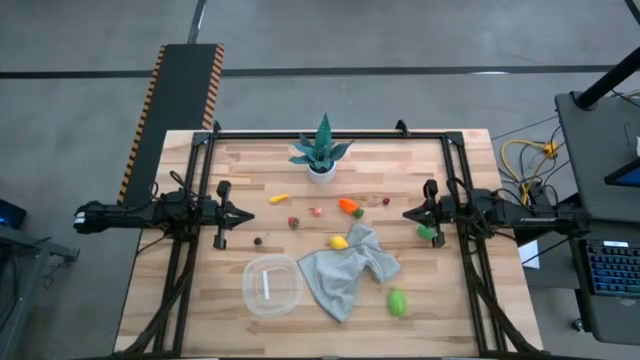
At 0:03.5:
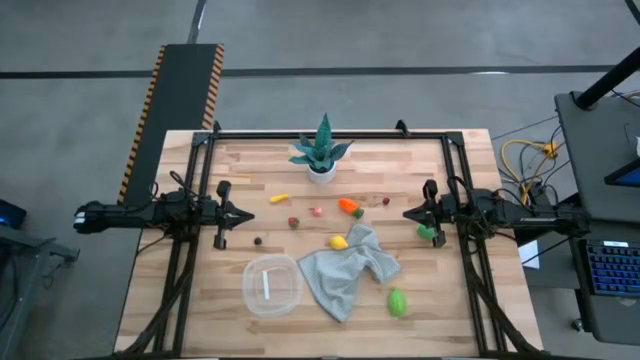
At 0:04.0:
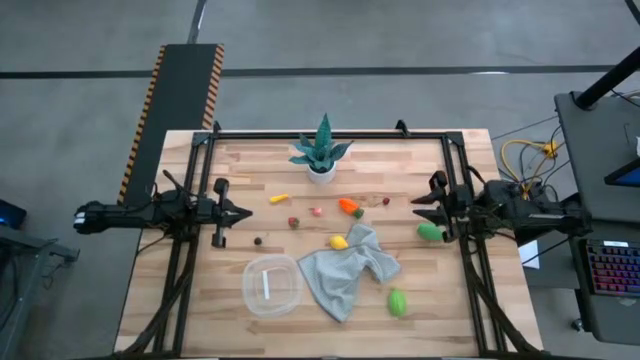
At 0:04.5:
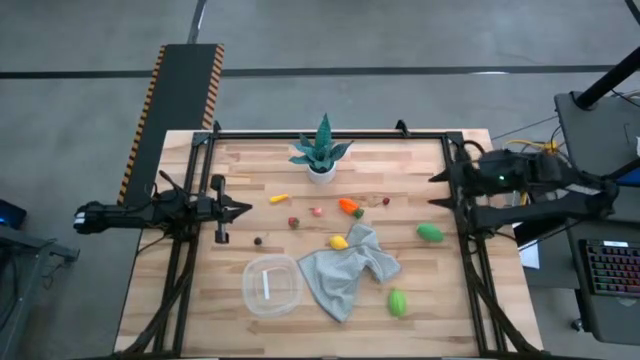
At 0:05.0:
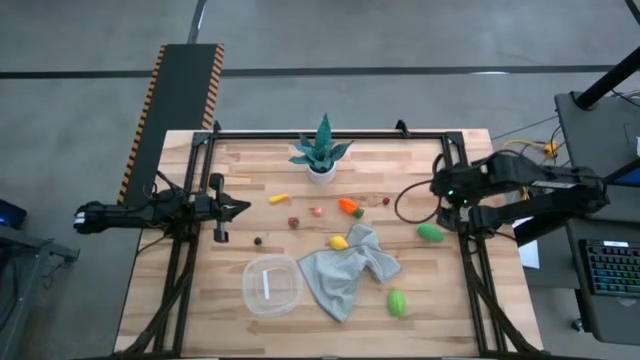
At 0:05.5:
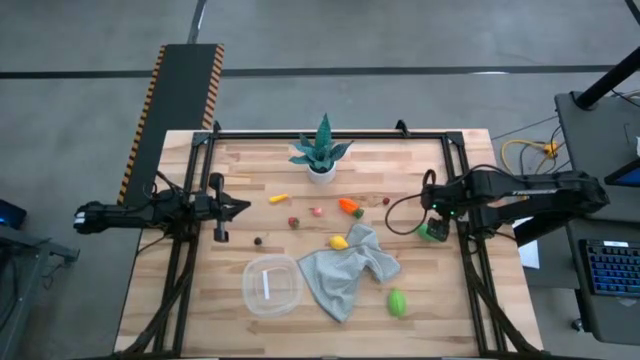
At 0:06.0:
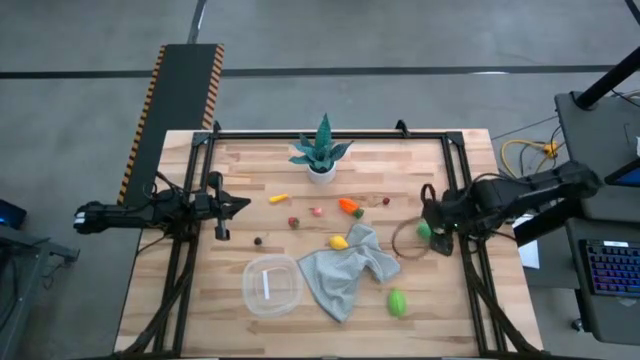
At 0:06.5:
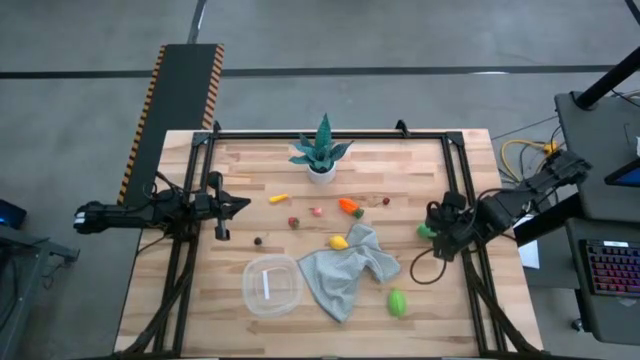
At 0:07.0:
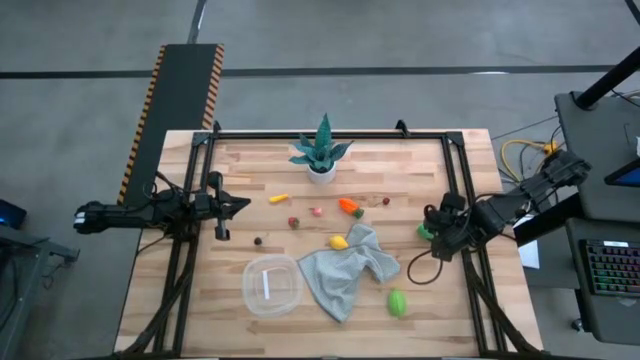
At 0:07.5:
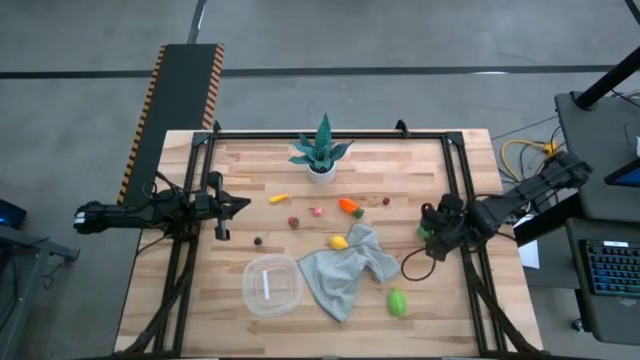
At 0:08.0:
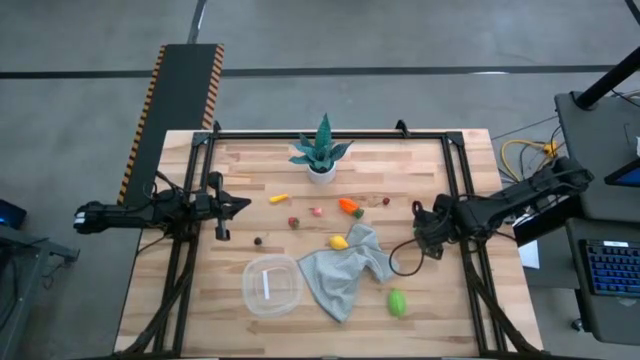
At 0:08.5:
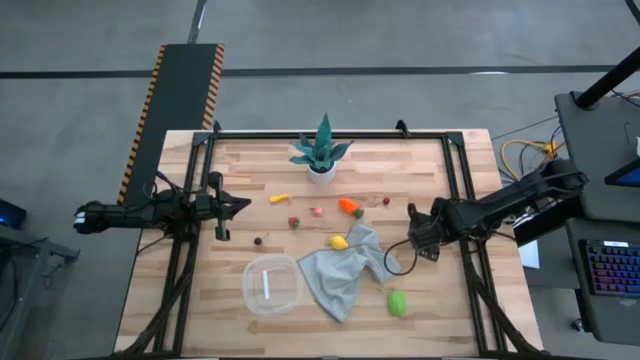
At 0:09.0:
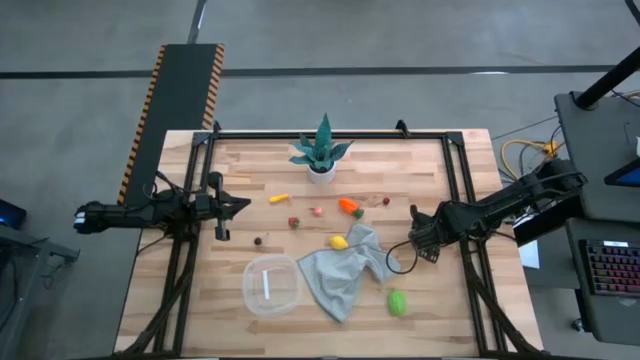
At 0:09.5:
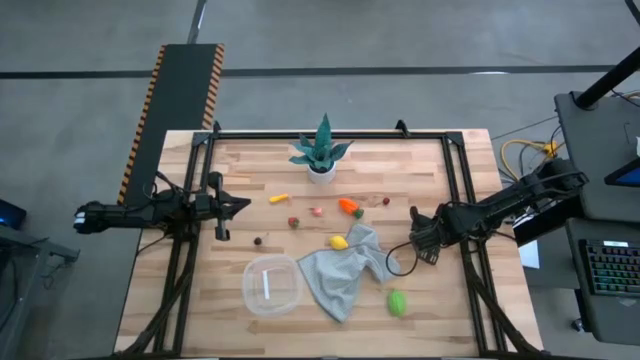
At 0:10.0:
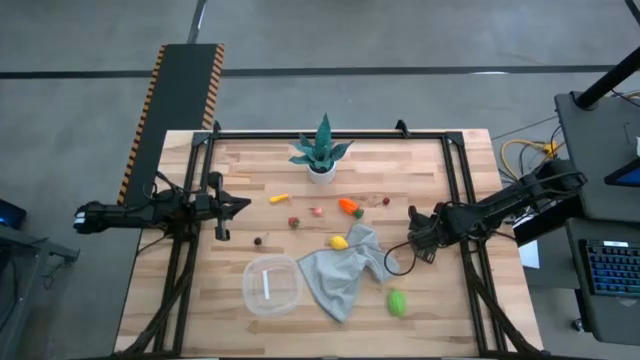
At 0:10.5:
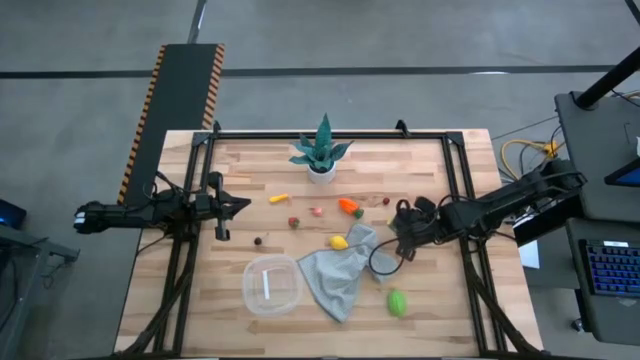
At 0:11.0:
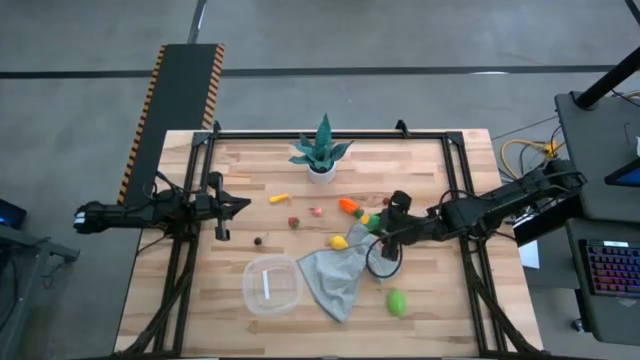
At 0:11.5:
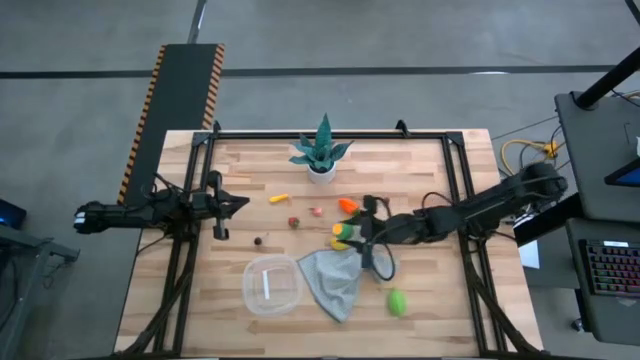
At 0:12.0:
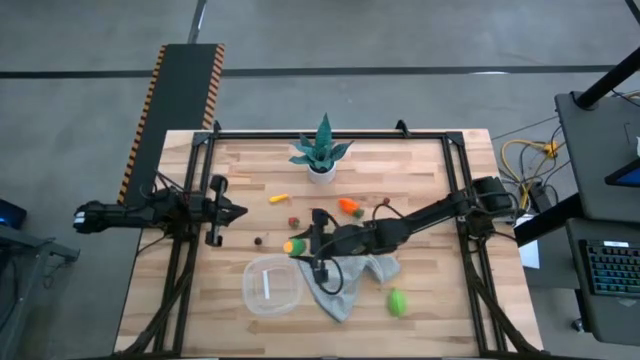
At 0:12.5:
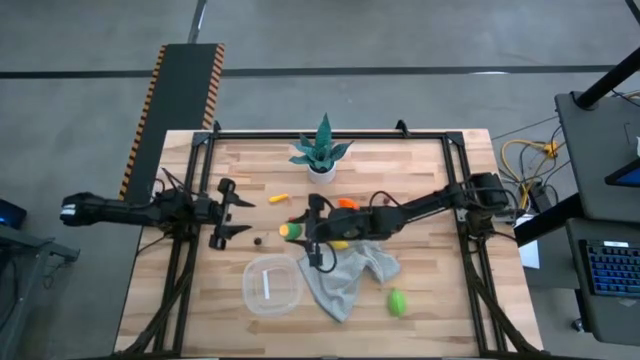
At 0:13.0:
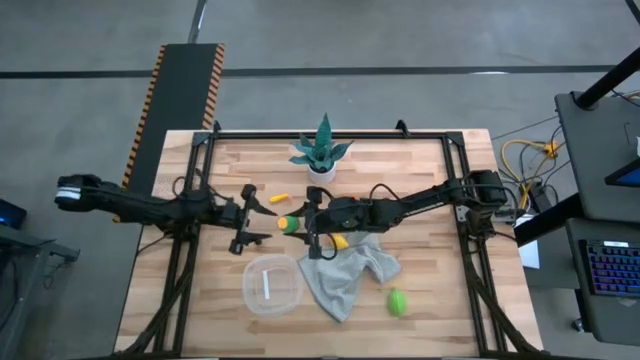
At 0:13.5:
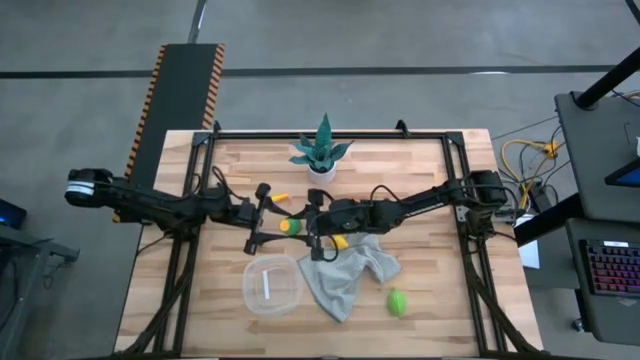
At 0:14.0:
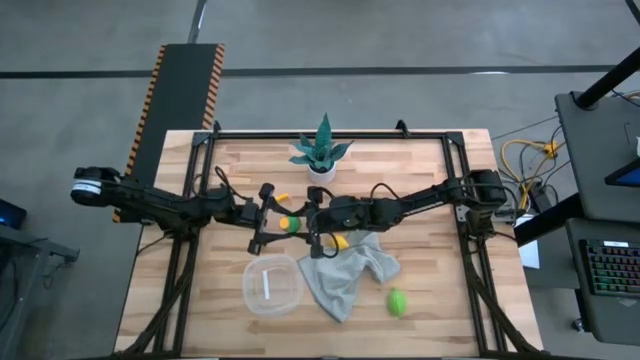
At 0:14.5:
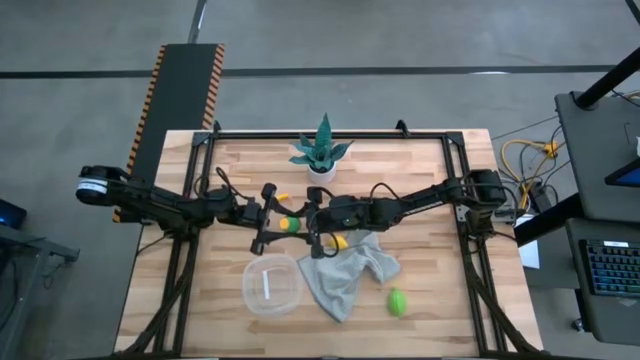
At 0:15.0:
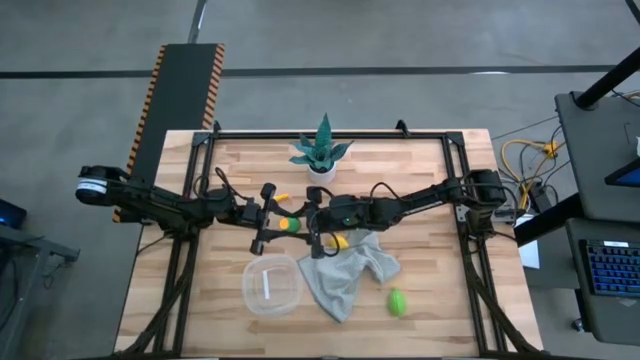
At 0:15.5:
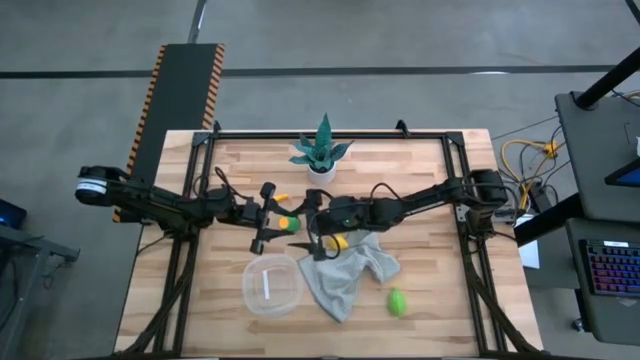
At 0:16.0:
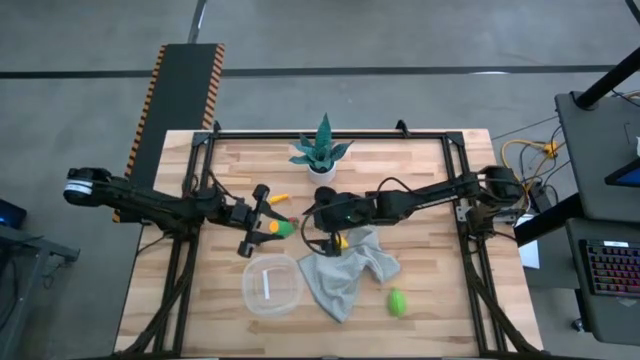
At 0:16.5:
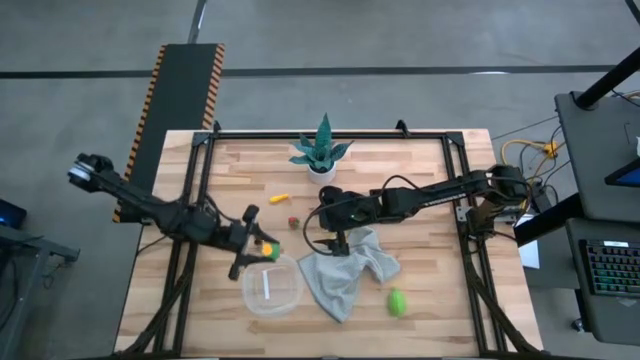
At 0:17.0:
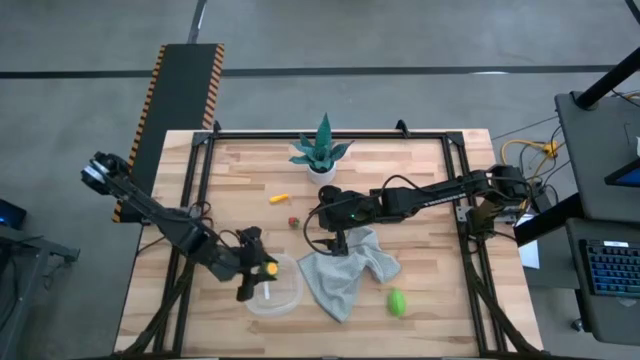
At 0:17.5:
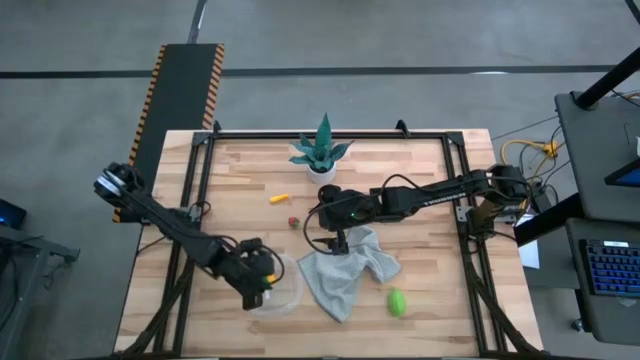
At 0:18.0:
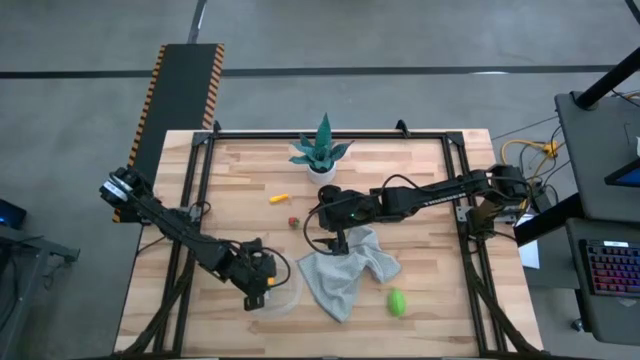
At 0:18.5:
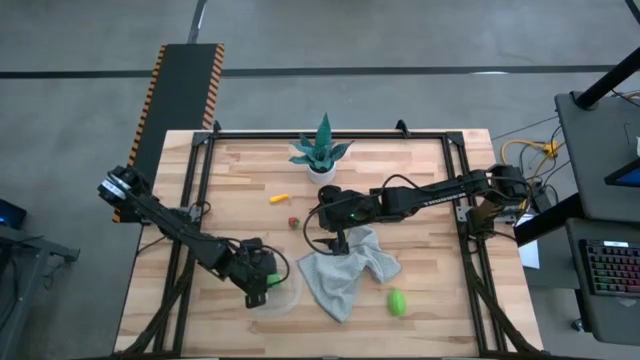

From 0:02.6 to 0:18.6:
Task: Pick and placing Produce into tupperware
Put the green corn in the transparent bin

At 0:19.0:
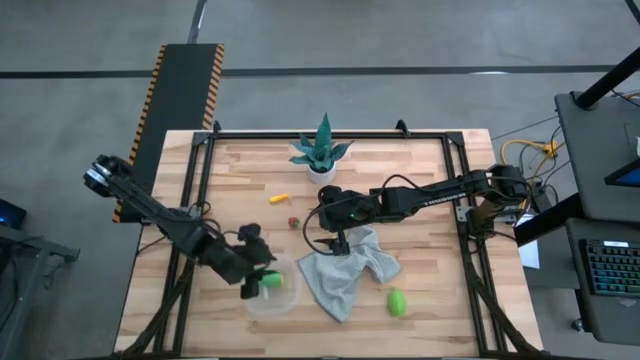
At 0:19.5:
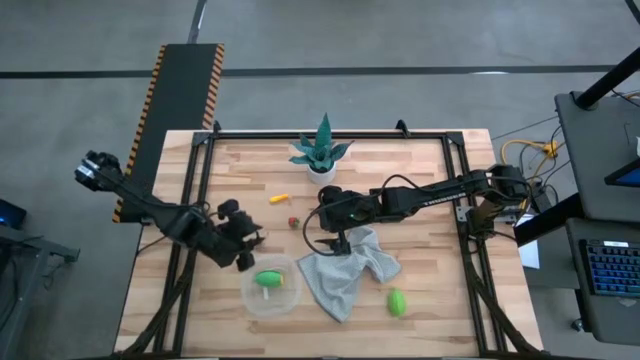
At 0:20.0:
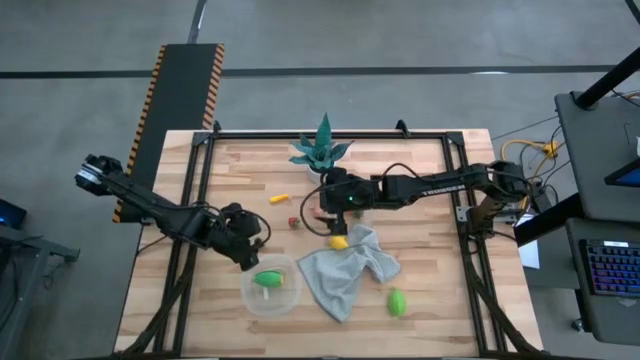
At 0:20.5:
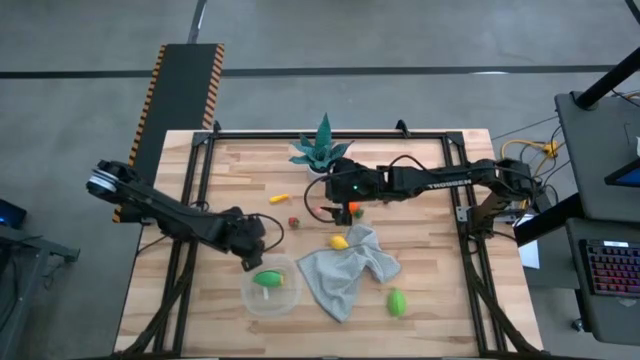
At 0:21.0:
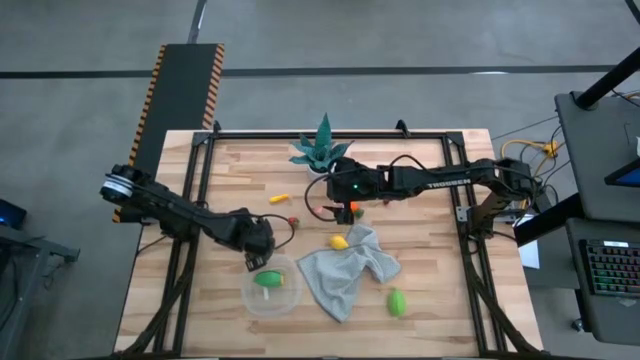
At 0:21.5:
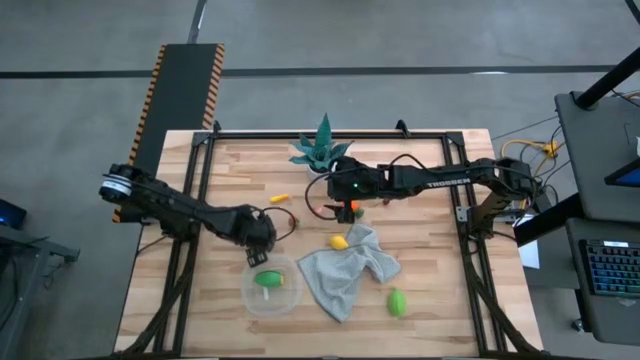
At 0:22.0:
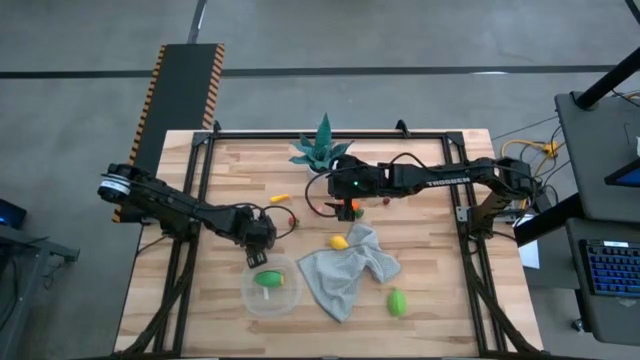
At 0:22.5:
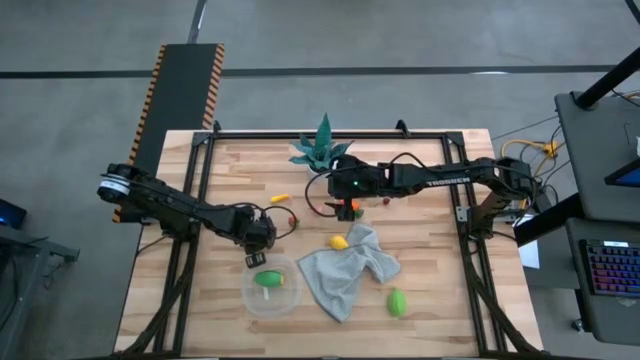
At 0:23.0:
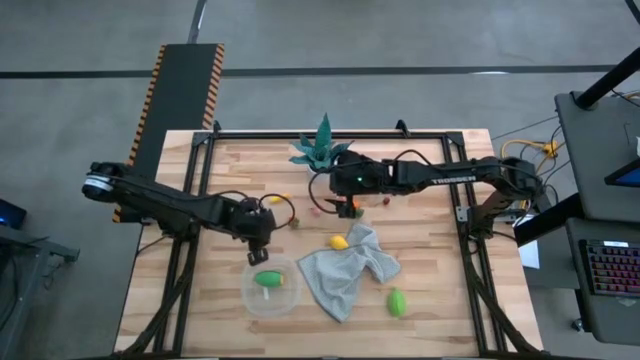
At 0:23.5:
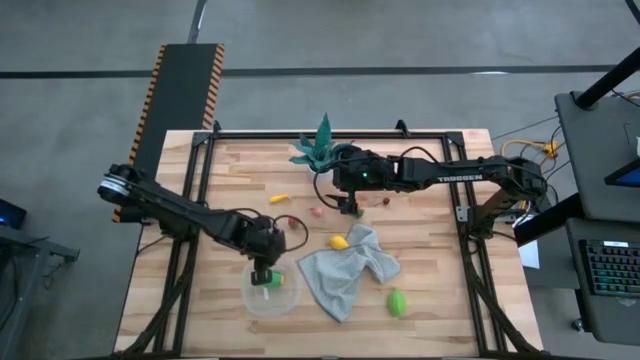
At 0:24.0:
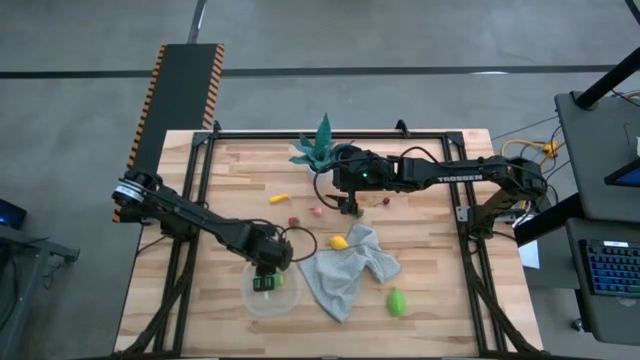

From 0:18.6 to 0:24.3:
Put the black cherry in the transparent bin
